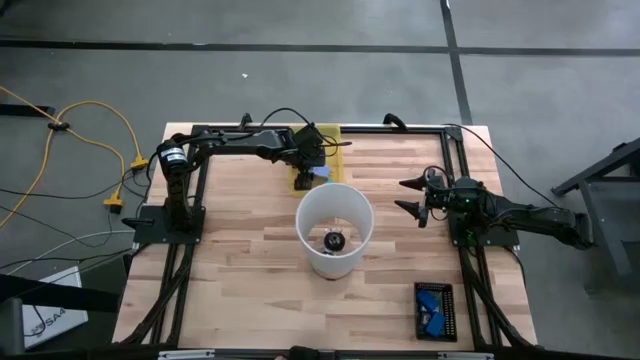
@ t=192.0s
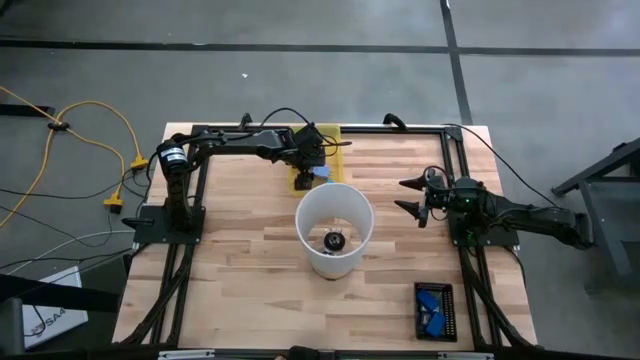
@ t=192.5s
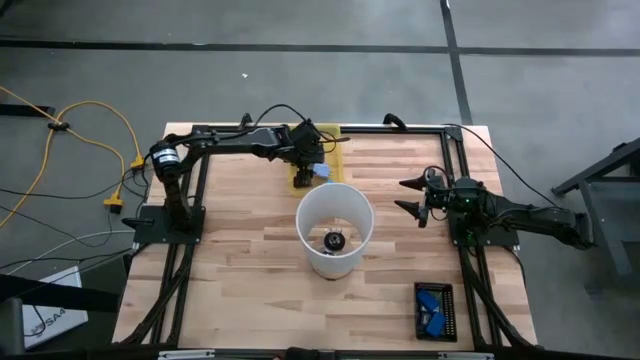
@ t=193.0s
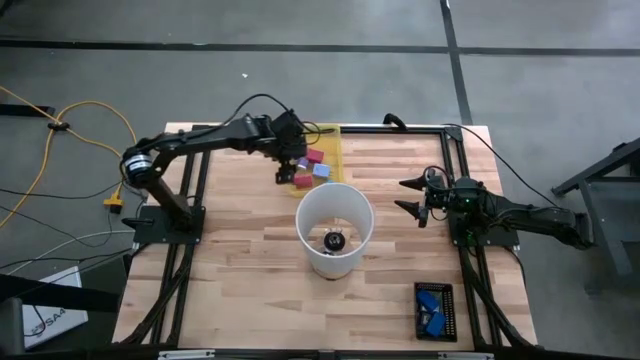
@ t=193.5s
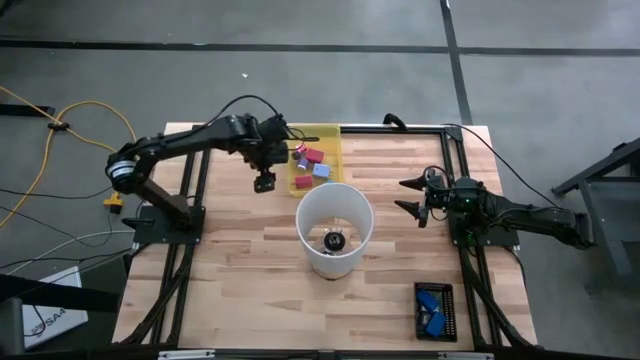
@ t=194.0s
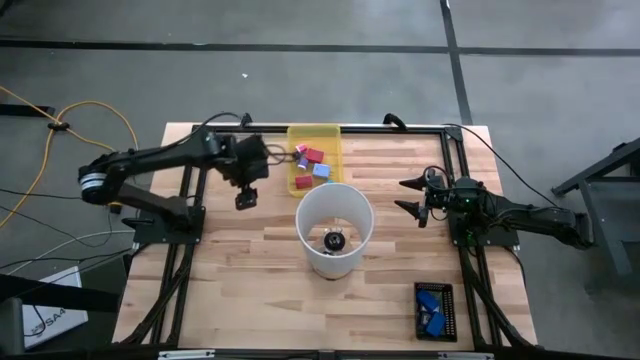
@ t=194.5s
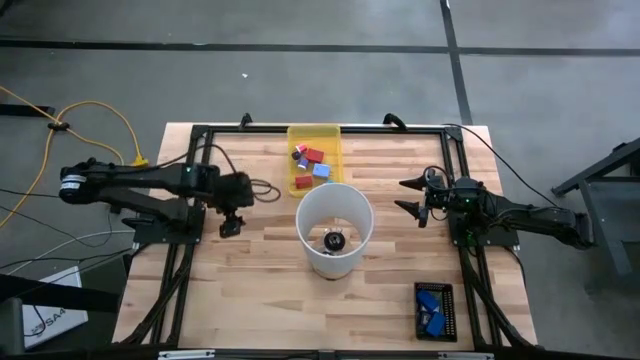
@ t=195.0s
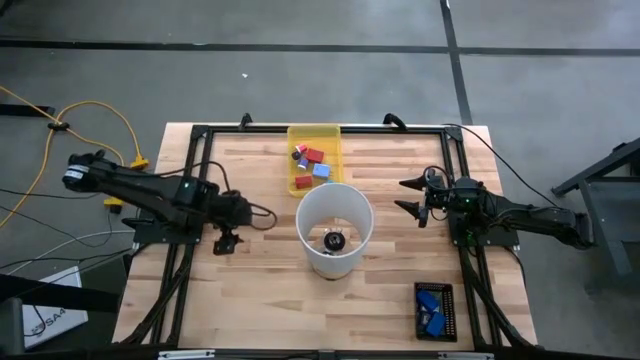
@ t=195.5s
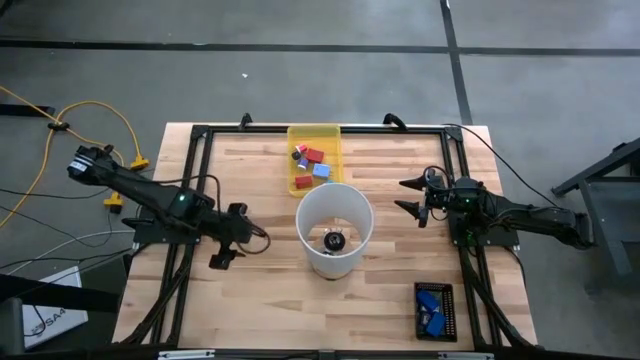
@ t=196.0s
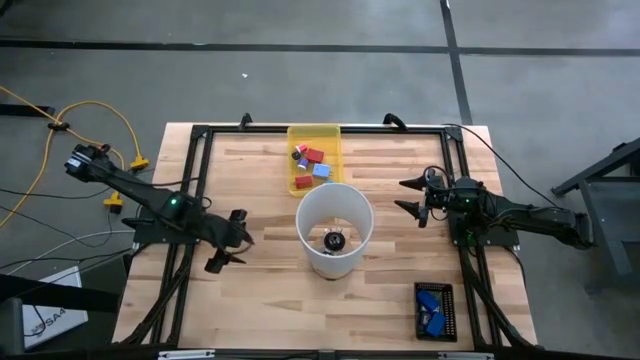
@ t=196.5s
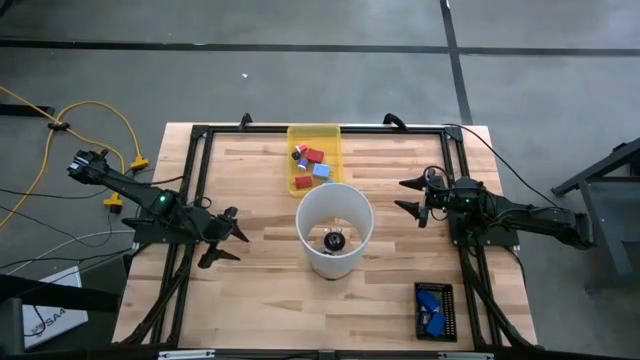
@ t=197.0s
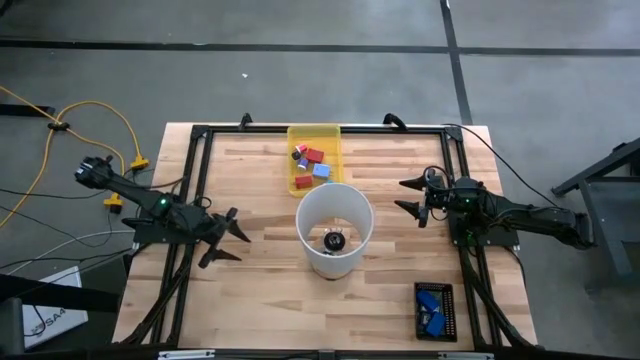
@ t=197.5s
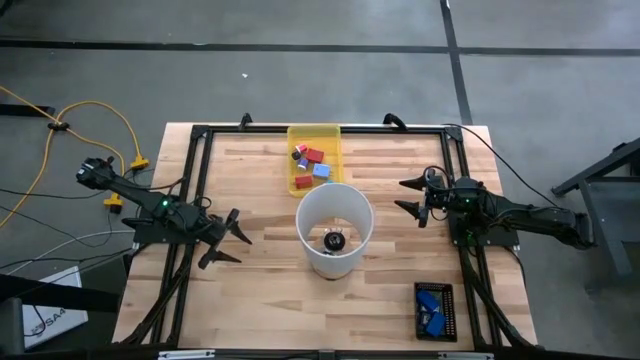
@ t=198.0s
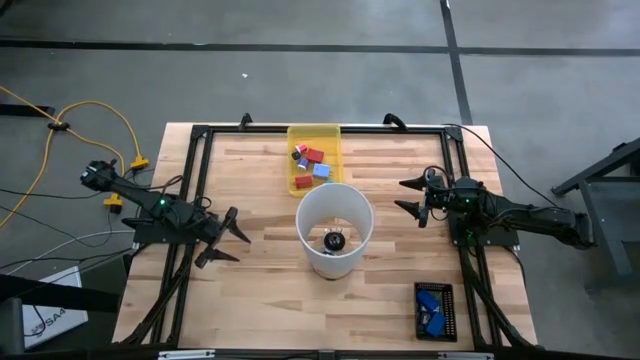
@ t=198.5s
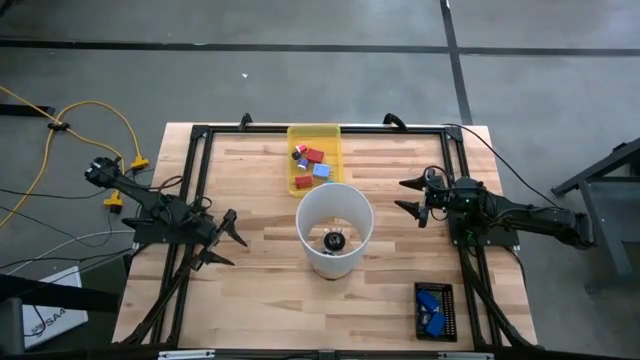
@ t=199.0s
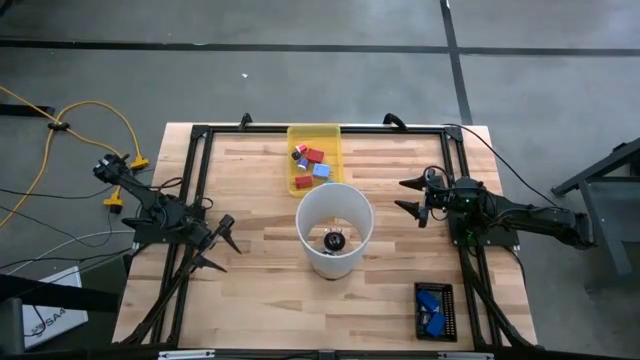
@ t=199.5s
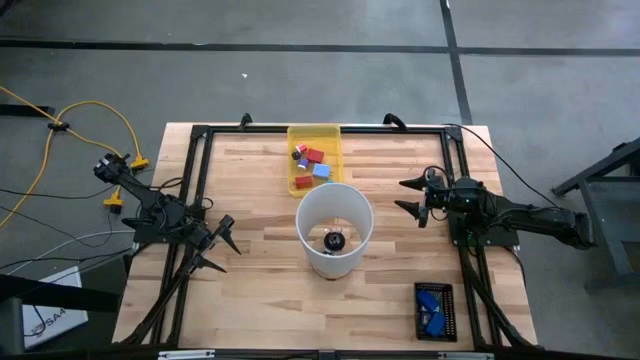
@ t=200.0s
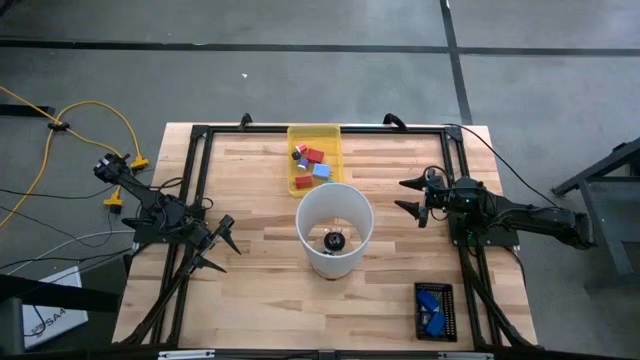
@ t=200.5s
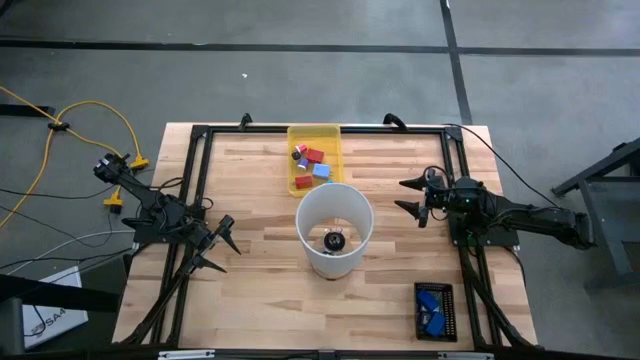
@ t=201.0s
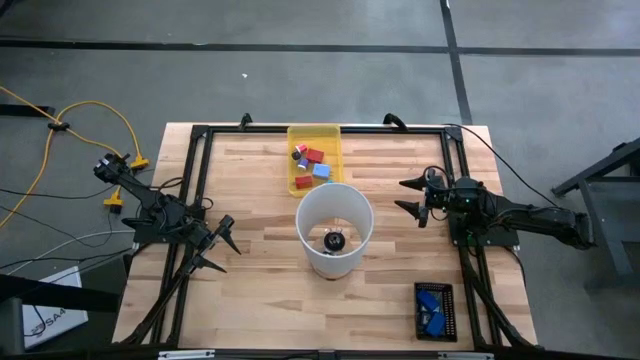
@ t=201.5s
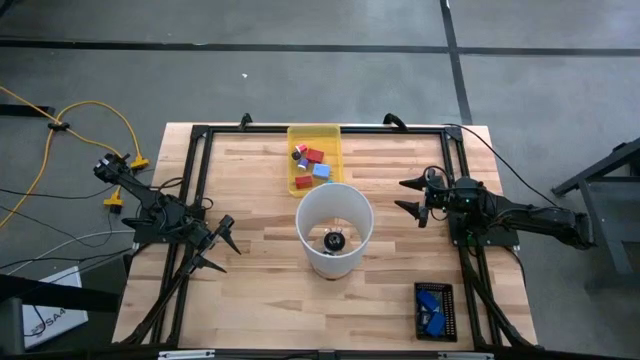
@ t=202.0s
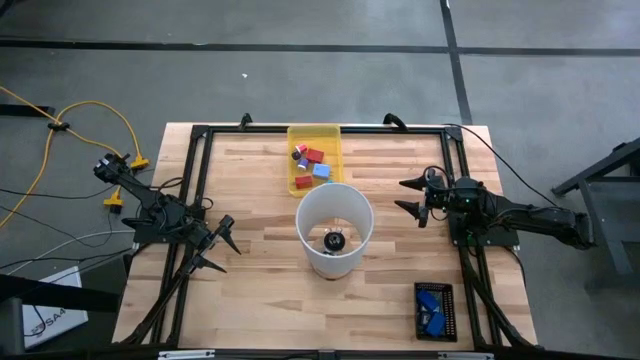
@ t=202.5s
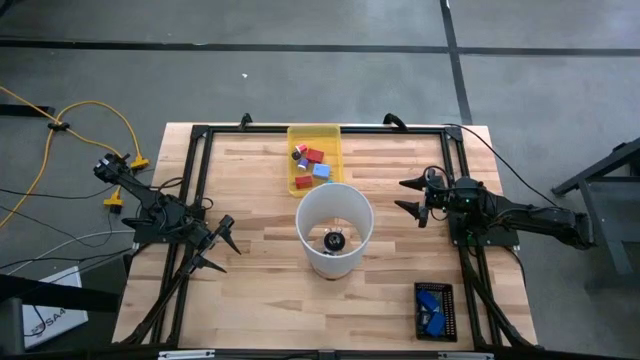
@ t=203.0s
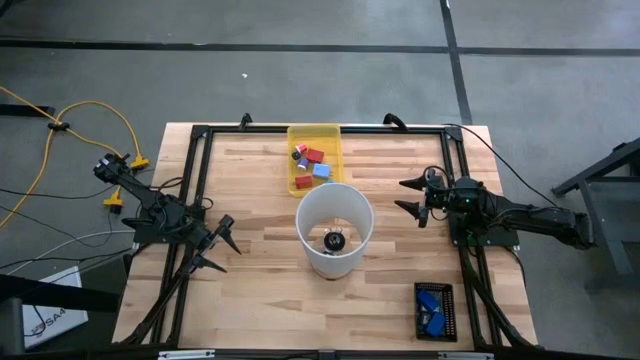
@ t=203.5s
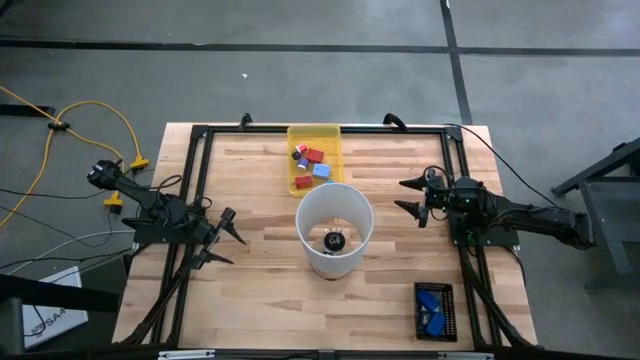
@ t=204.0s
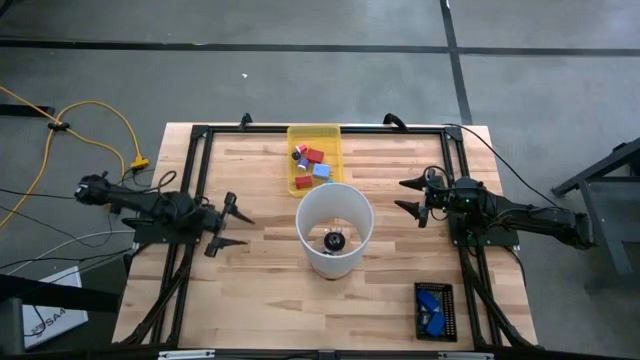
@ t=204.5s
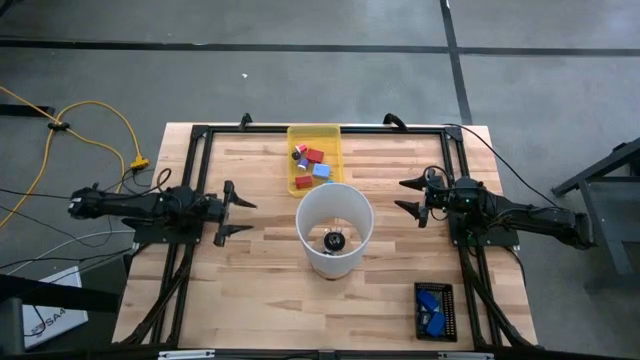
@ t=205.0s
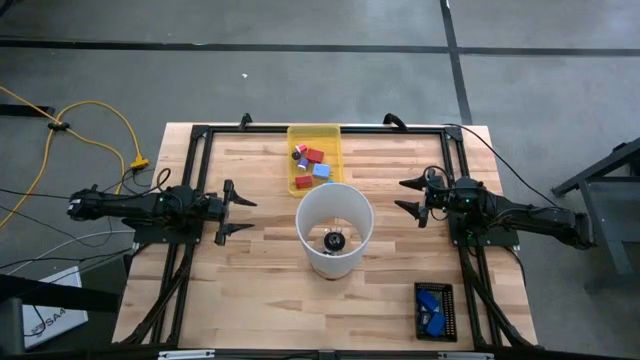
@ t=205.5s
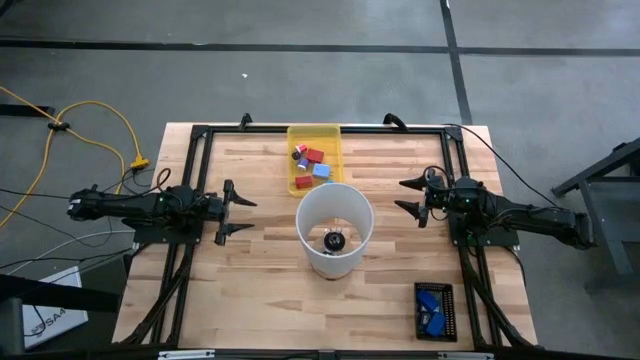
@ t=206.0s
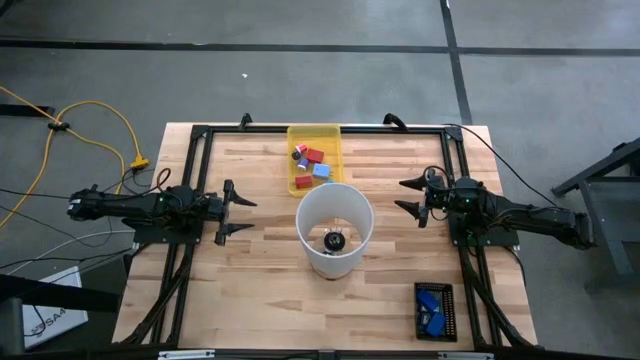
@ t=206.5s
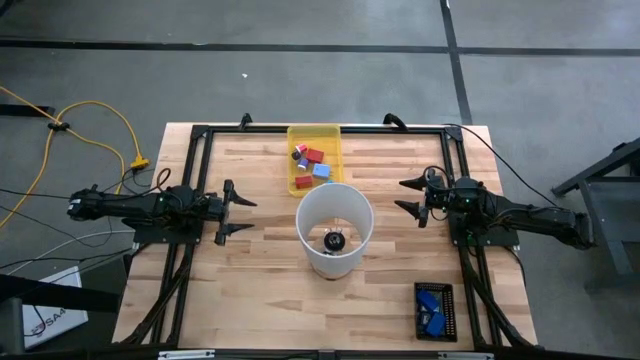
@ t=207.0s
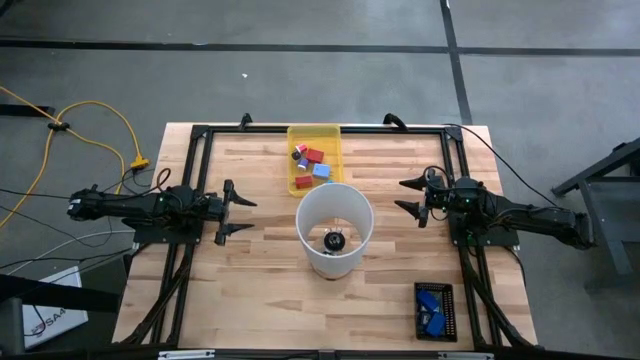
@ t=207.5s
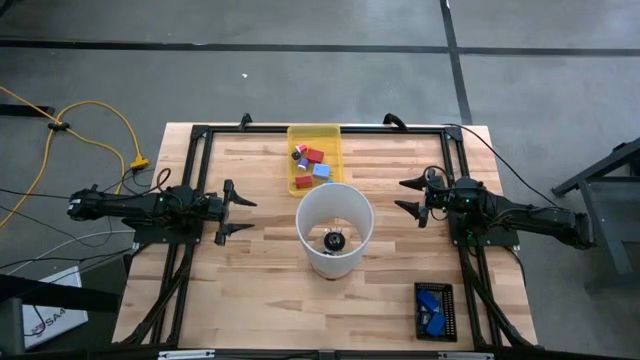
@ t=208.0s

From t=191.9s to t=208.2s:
Task: Pick & Place Office items
Return to Home Position
